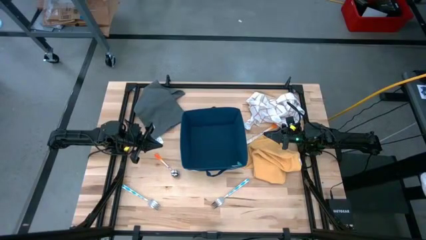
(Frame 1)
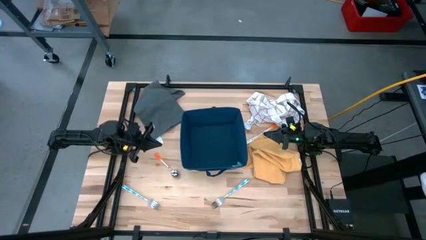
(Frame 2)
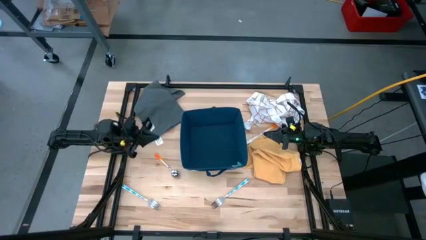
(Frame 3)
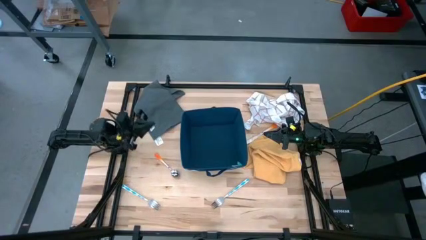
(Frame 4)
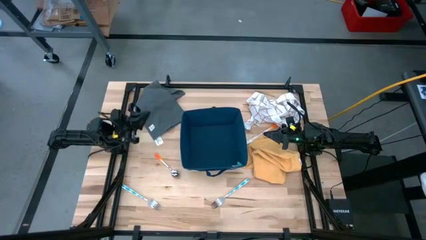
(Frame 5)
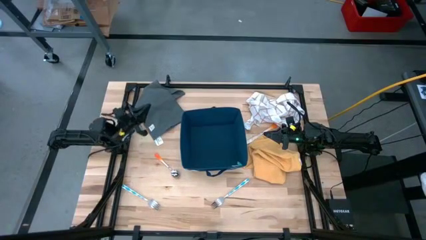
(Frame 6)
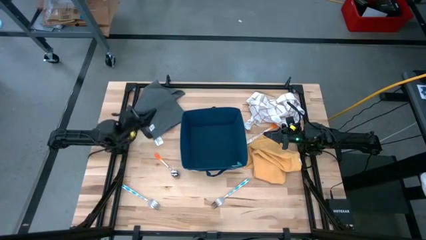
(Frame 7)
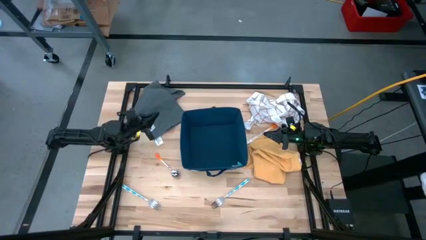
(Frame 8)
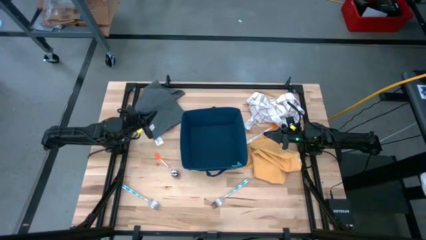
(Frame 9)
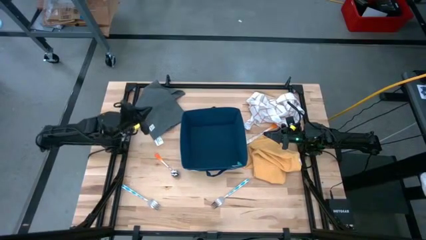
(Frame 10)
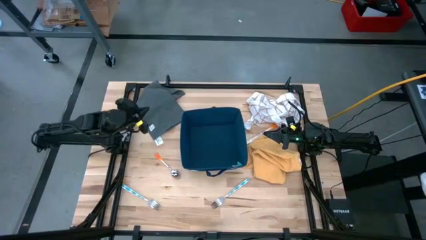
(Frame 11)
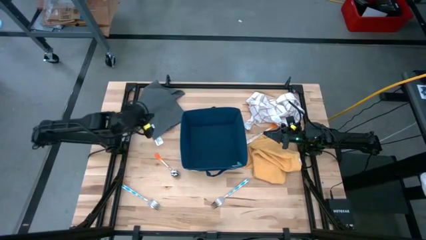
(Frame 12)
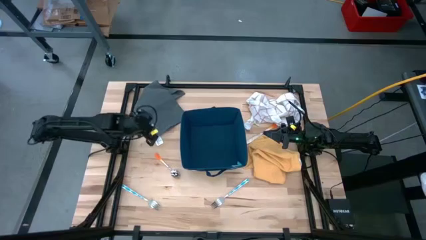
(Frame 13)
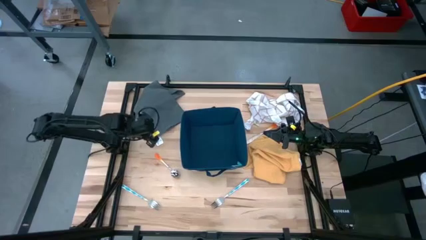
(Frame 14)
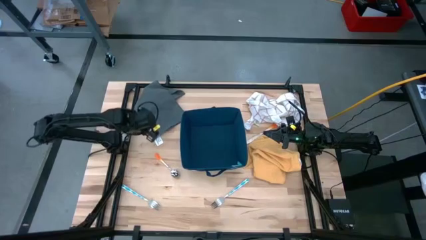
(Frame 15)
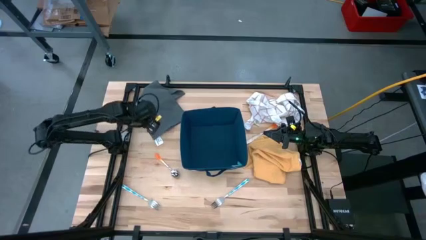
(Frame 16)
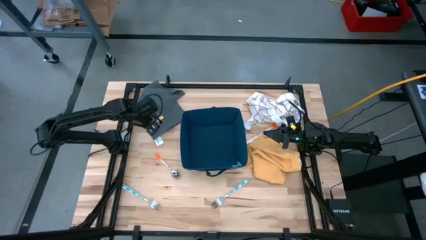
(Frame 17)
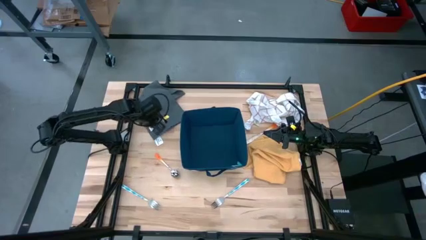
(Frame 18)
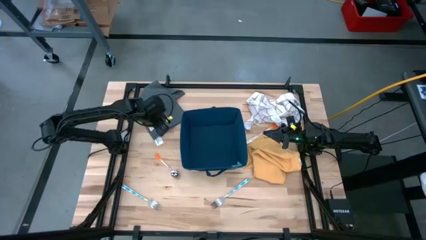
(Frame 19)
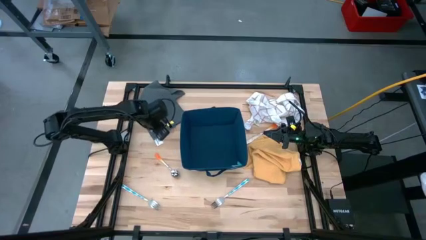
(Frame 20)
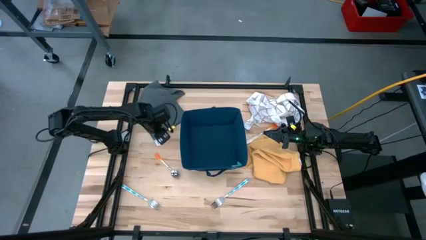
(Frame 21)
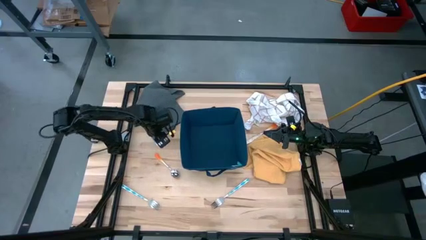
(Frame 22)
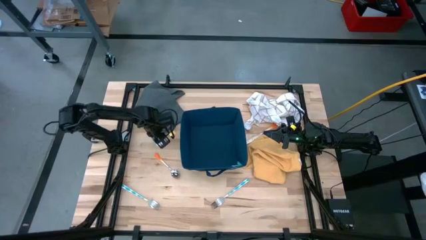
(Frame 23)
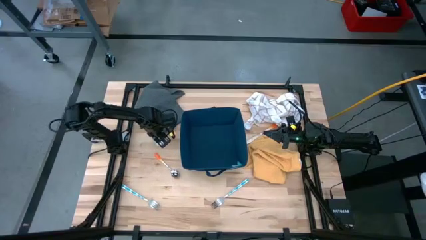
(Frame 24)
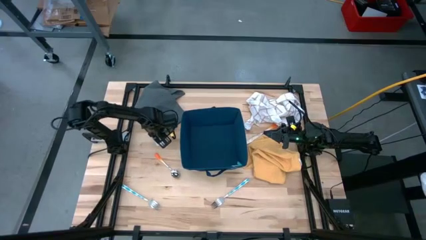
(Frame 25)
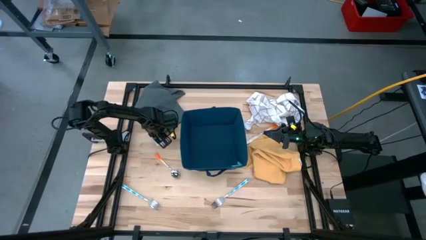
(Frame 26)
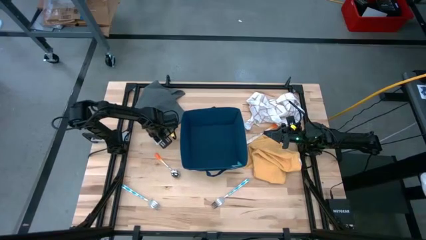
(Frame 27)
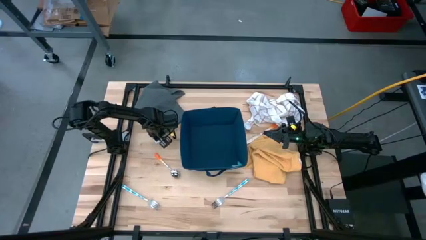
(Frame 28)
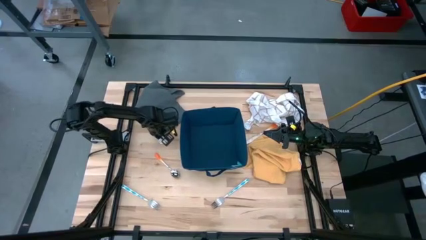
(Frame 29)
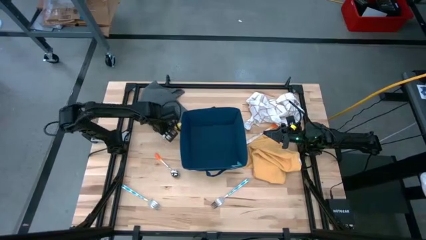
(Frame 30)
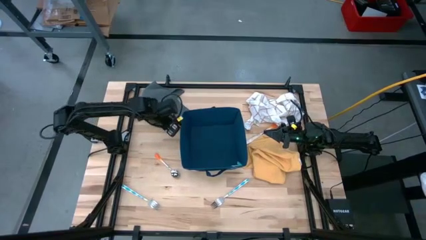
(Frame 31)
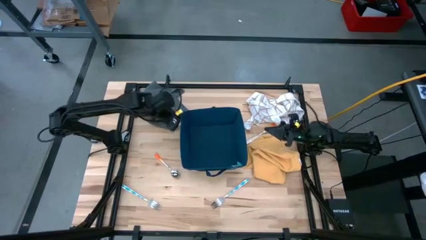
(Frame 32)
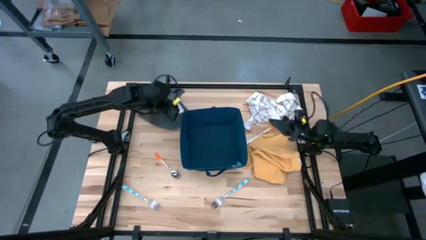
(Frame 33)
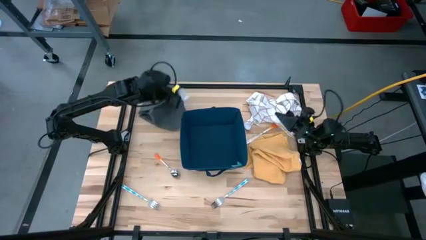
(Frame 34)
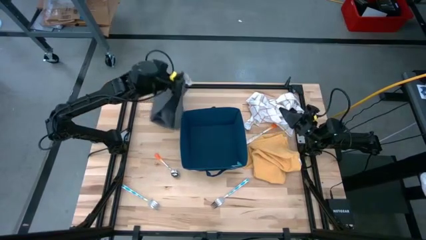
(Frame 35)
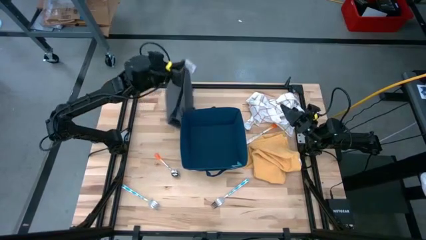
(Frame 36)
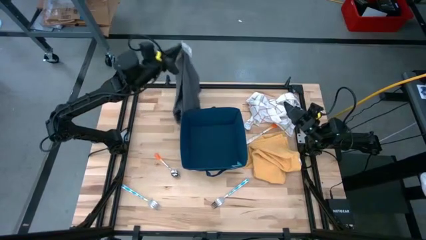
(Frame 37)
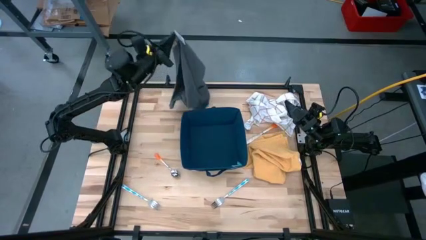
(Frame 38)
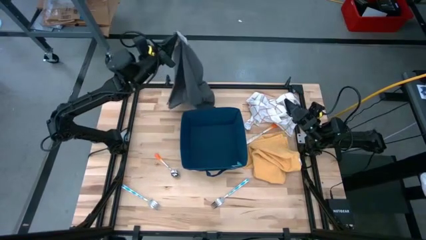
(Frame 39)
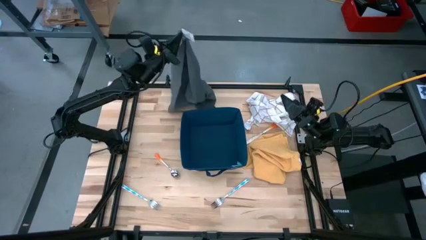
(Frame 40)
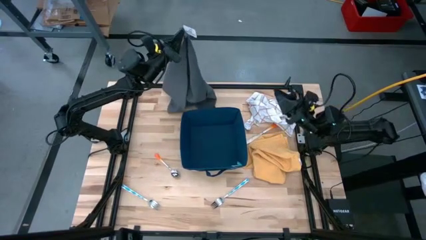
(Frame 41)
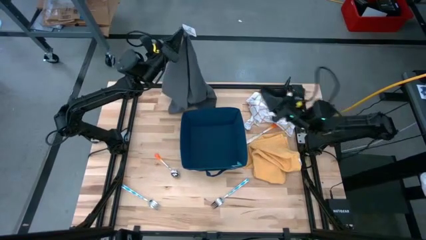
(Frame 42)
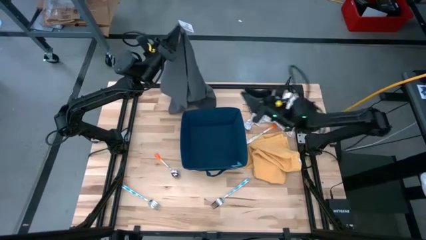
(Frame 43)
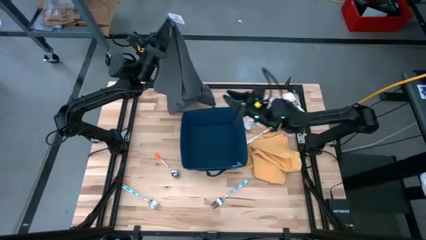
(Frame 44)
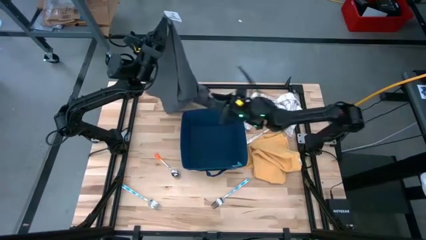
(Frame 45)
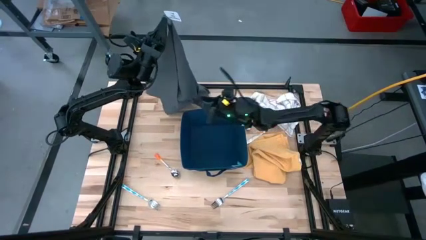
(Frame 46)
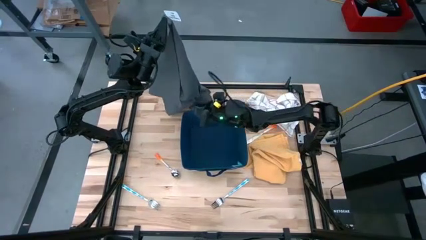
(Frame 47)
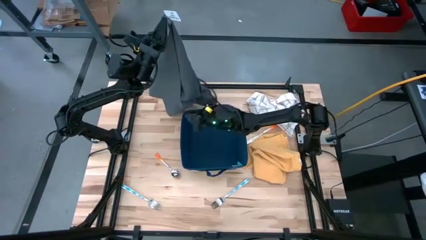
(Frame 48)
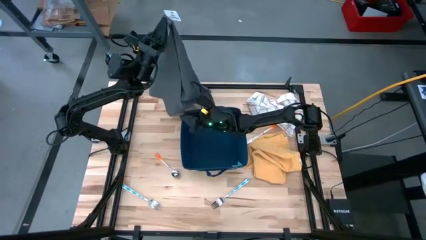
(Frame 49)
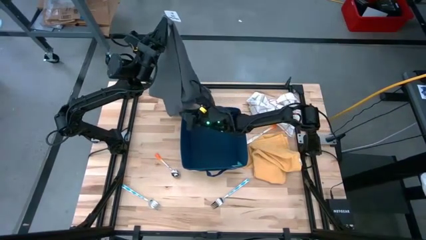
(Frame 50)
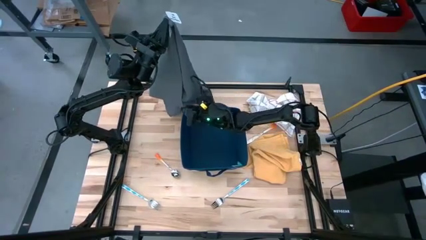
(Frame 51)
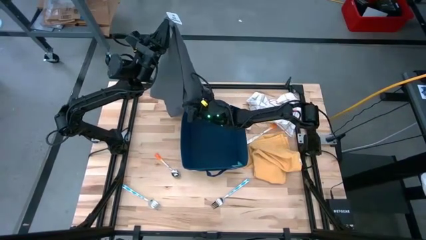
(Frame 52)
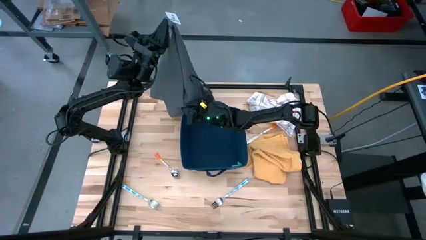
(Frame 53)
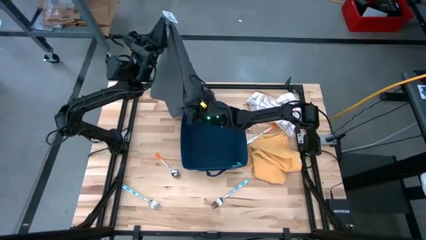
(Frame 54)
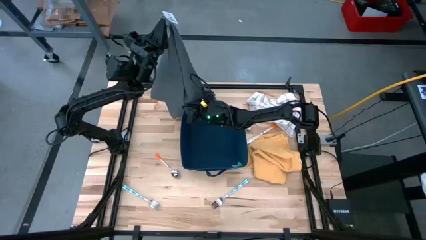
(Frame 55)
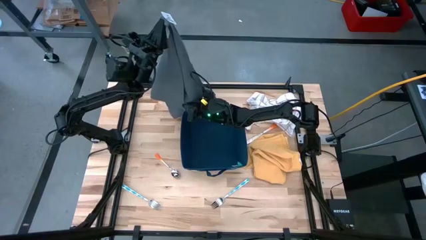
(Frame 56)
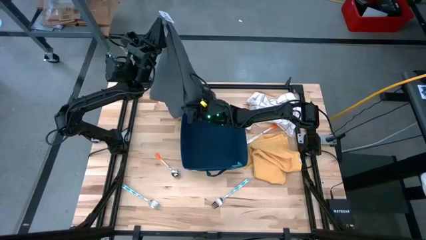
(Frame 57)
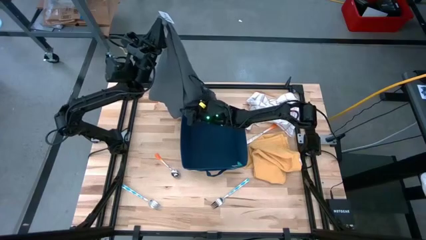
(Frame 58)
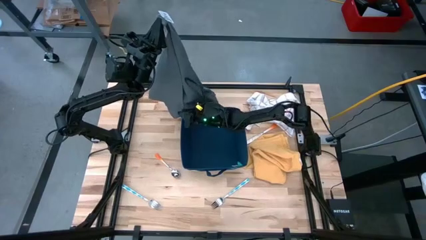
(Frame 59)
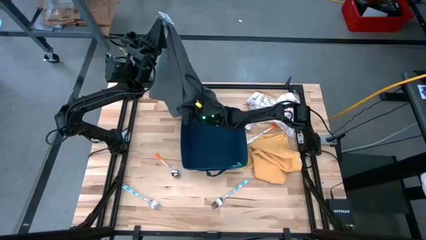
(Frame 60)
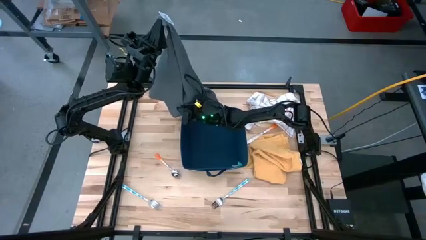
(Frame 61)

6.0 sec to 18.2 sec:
Task: Fold towel
Fold the gray towel
